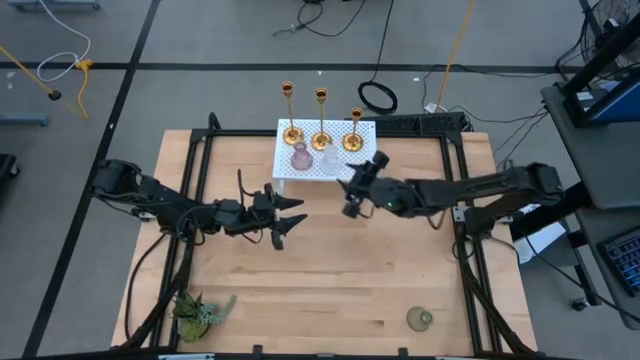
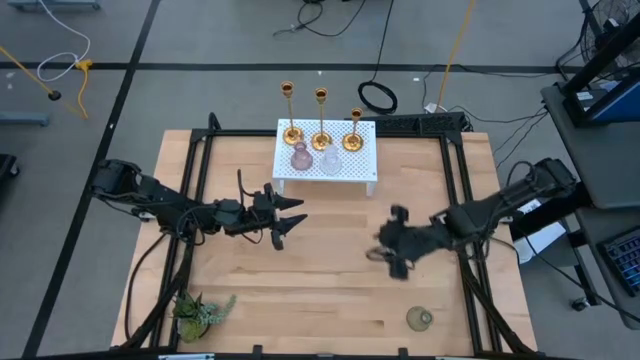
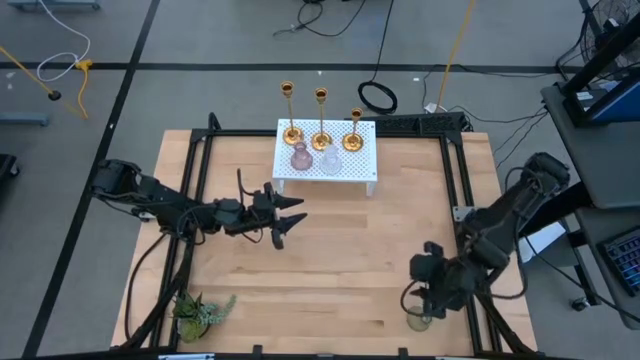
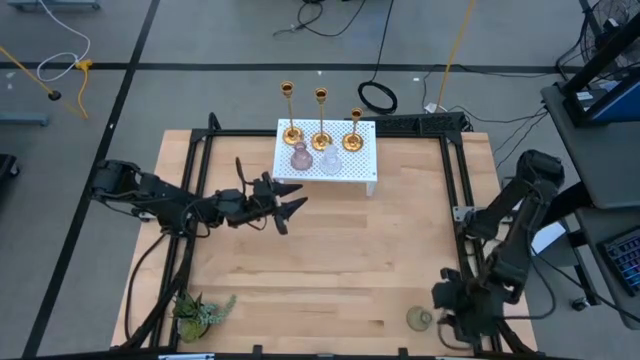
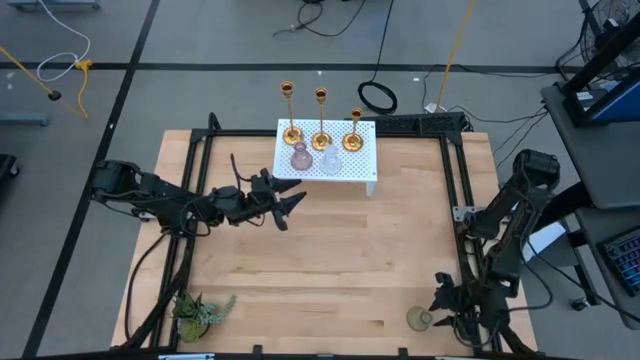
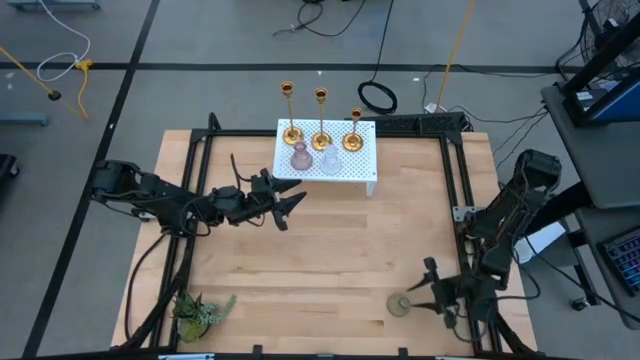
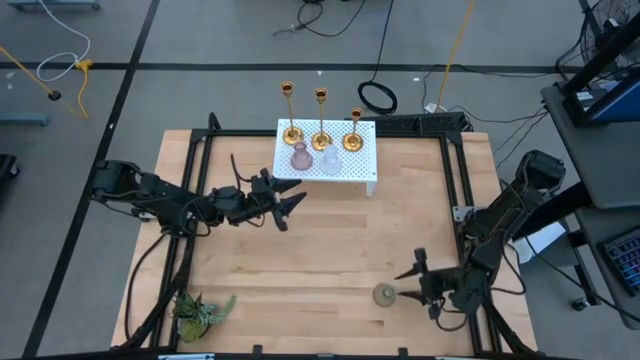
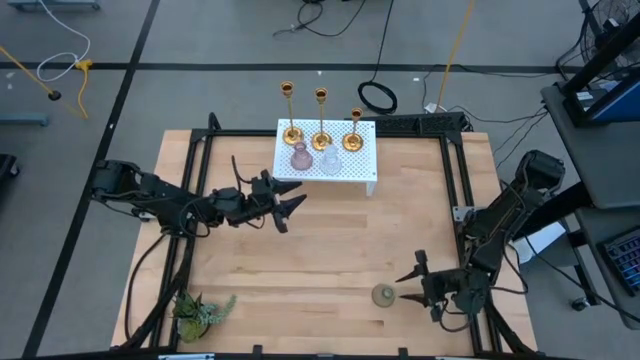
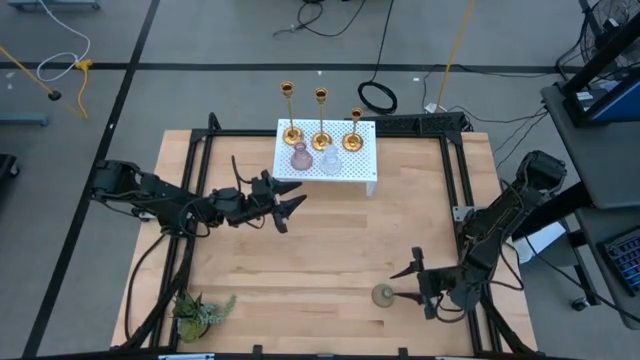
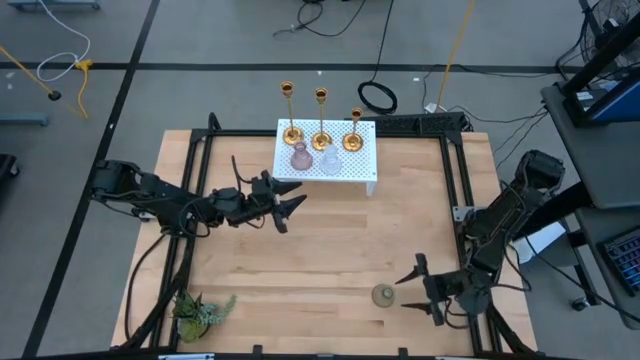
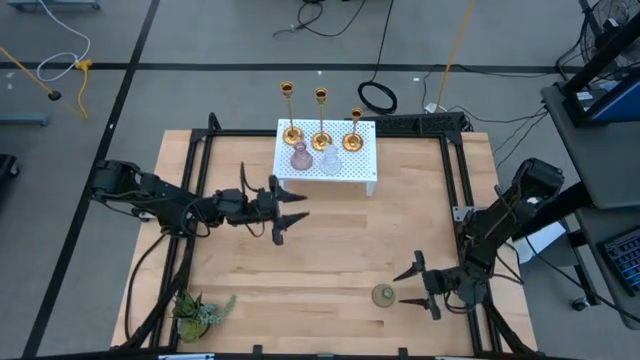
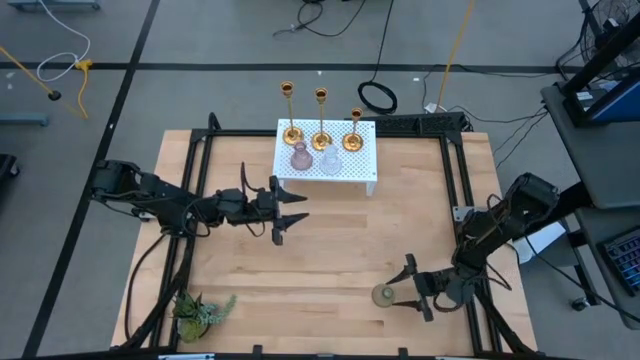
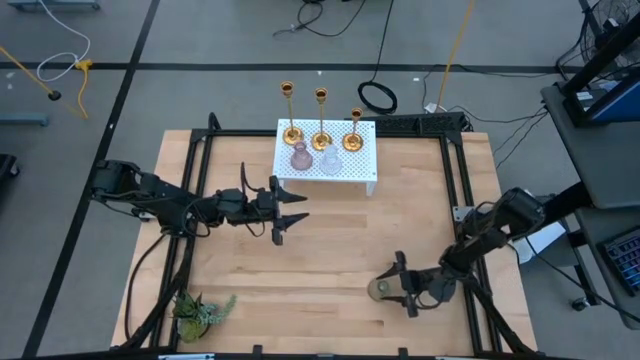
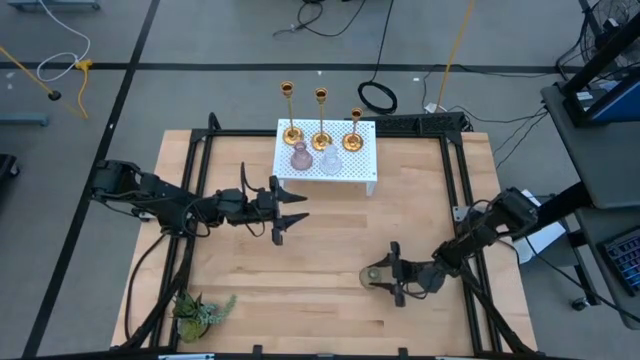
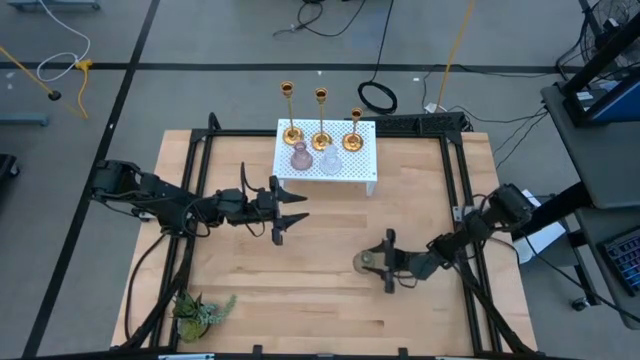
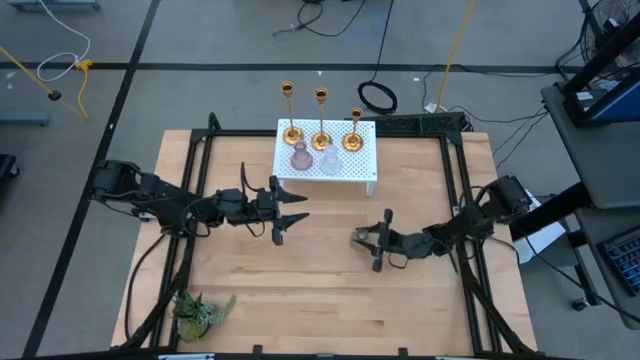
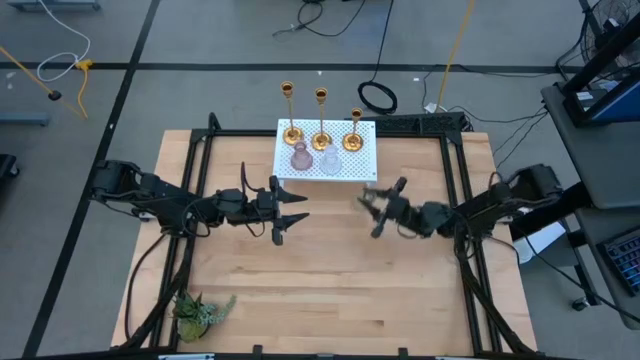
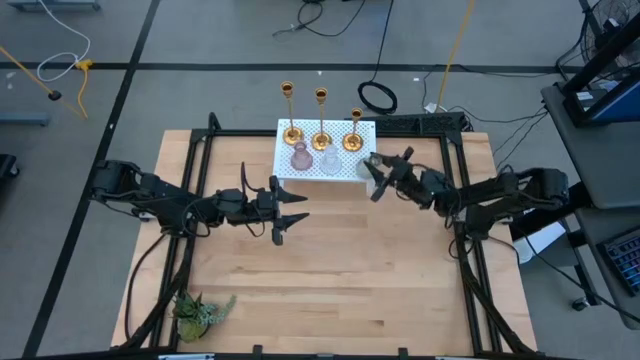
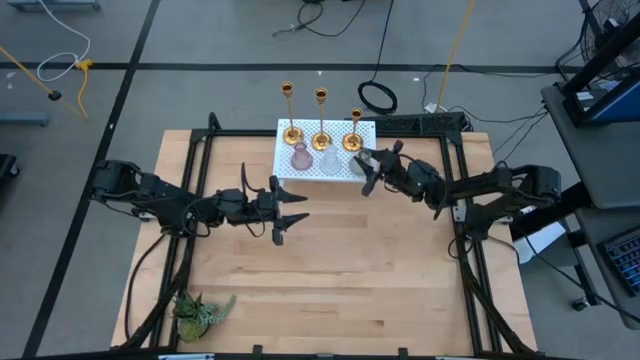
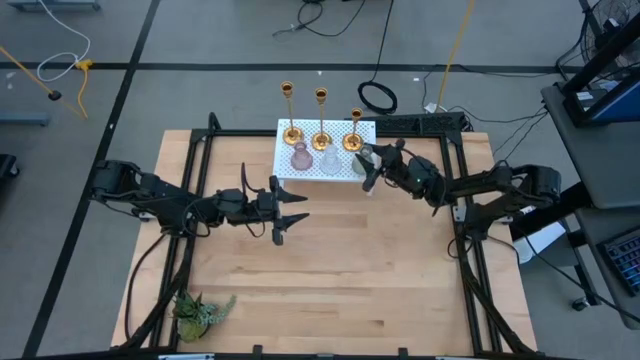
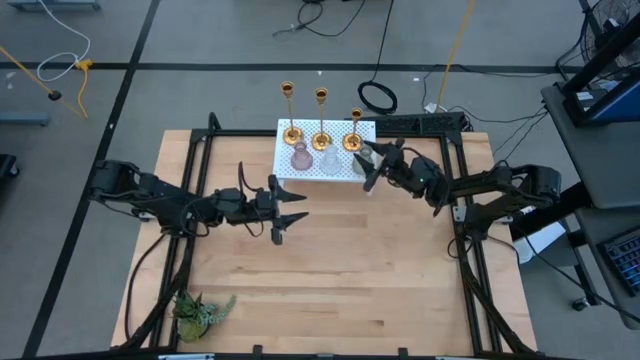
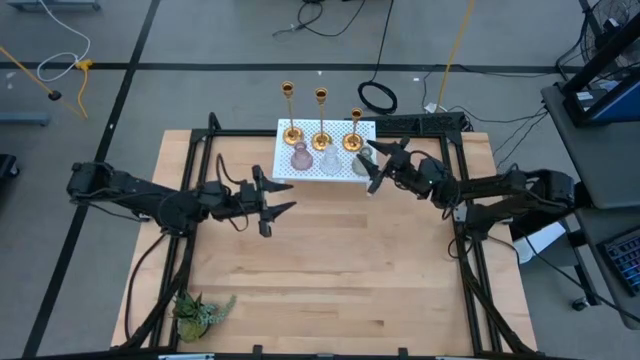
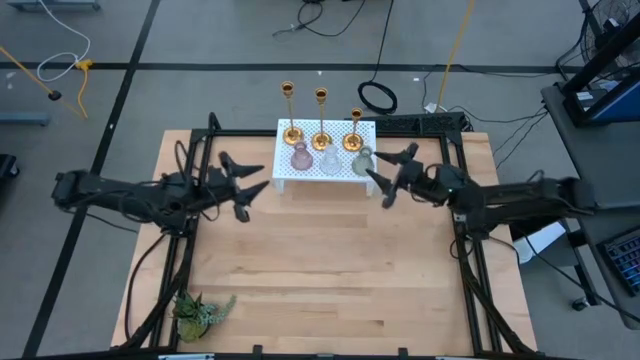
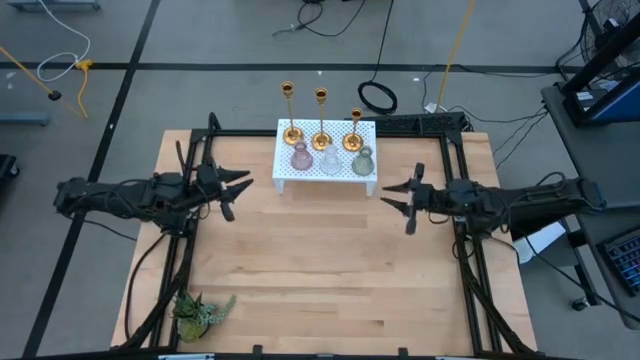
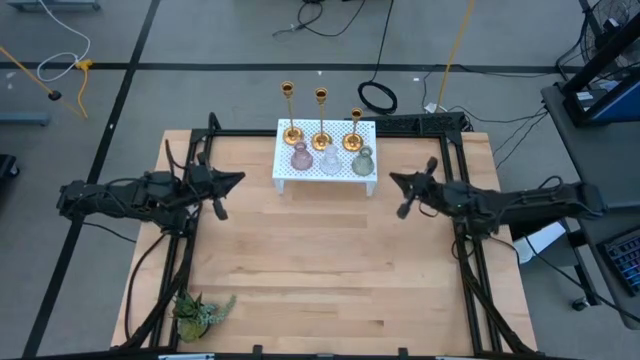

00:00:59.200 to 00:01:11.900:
Task: Pick & Place candle stick holders
Return to Home Position

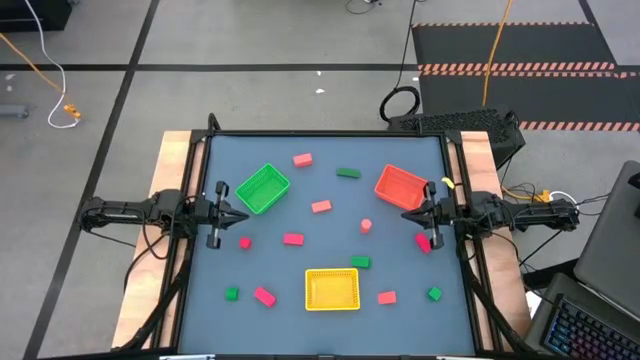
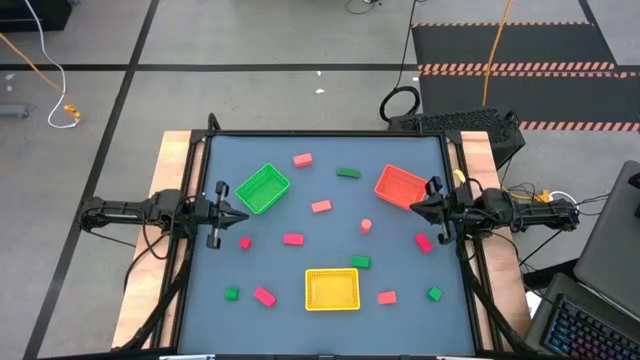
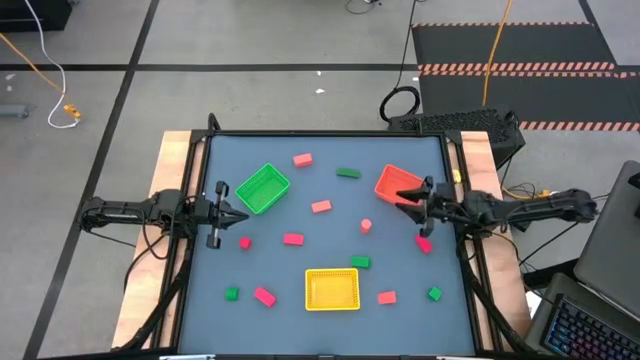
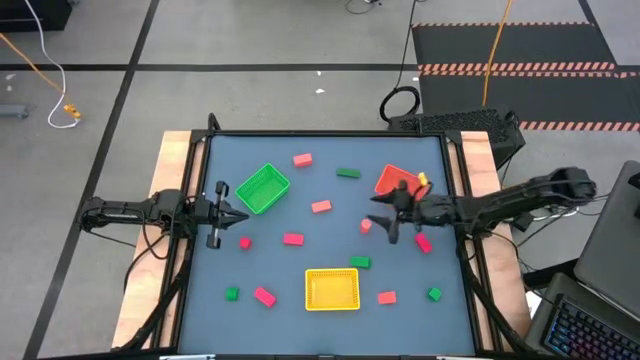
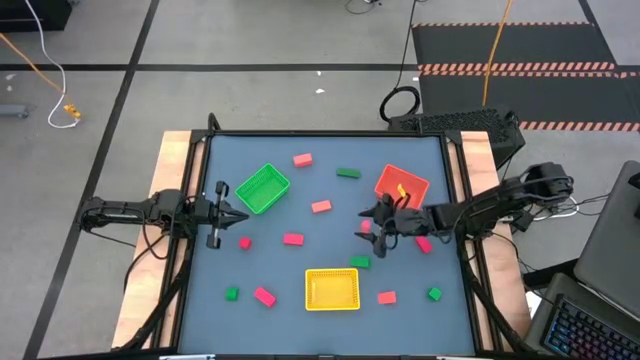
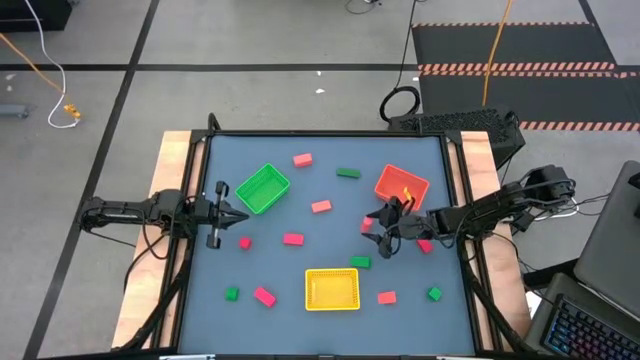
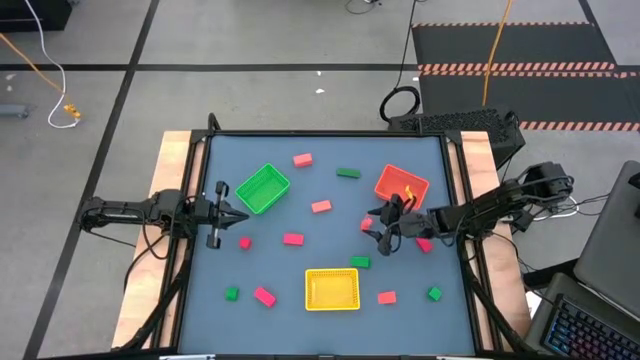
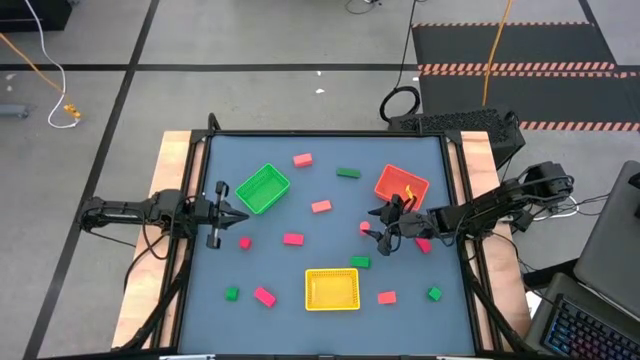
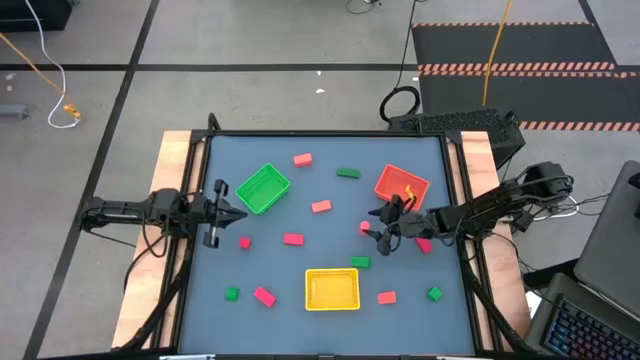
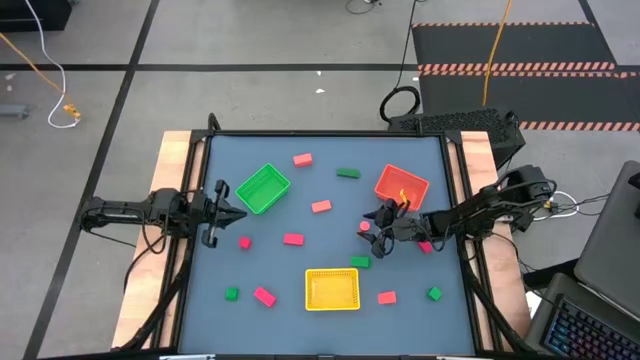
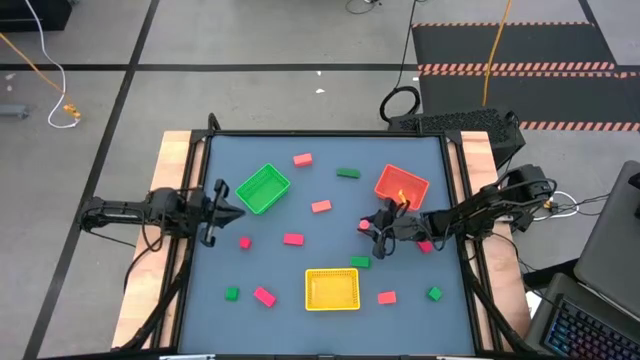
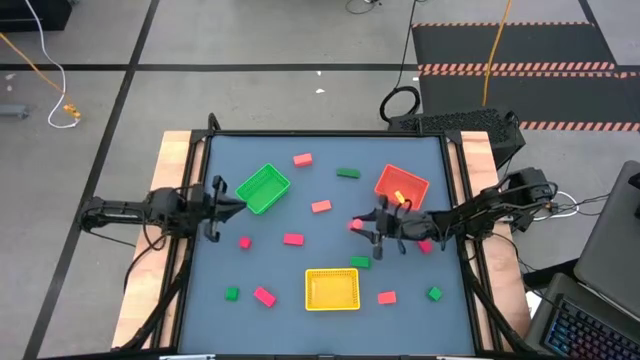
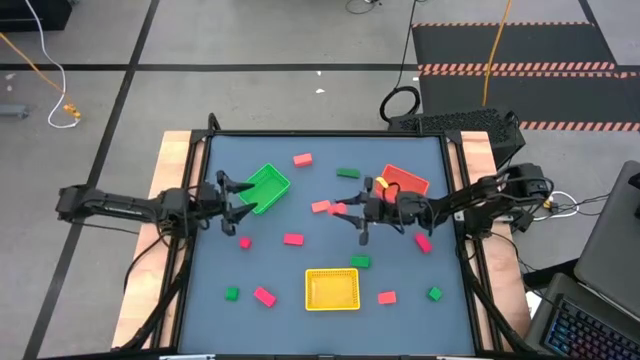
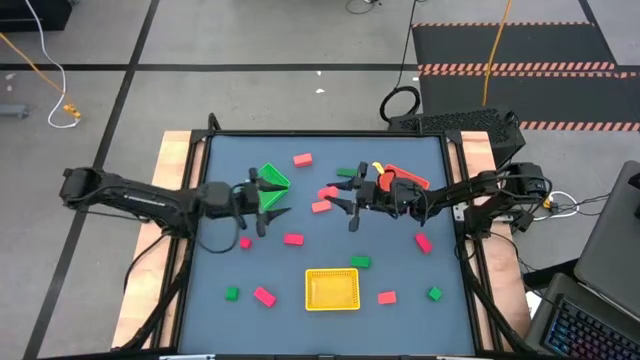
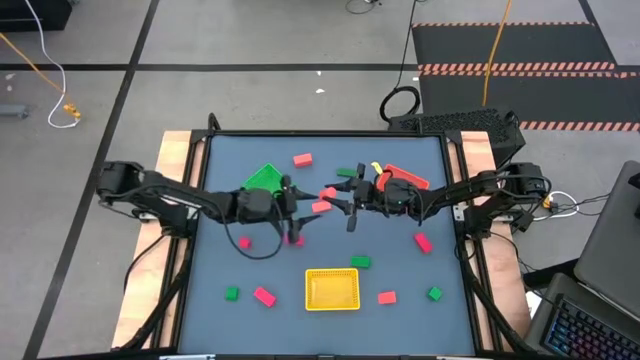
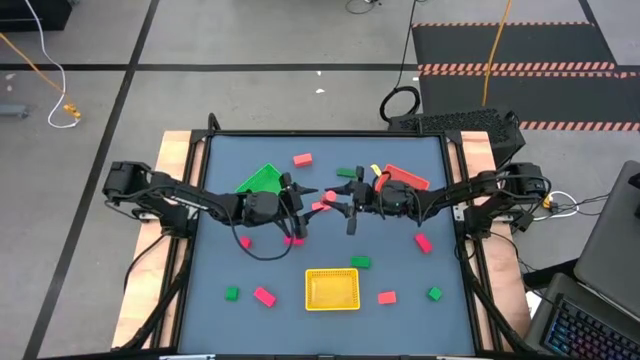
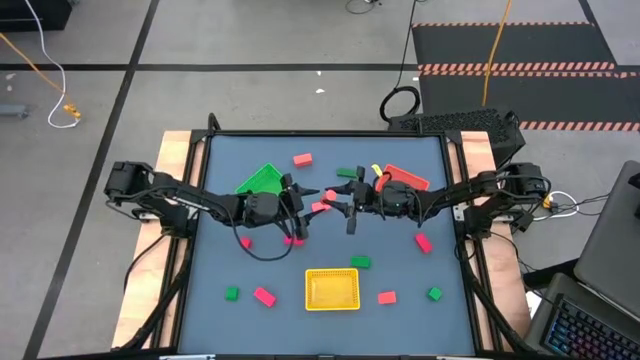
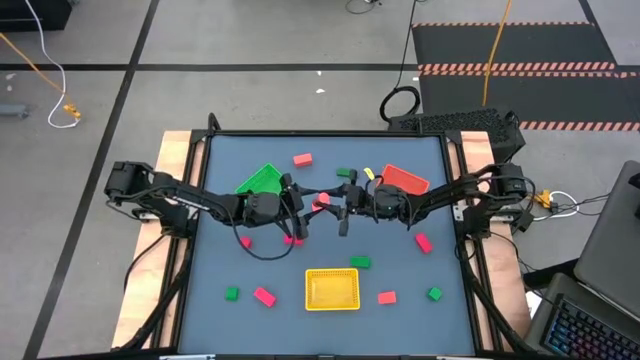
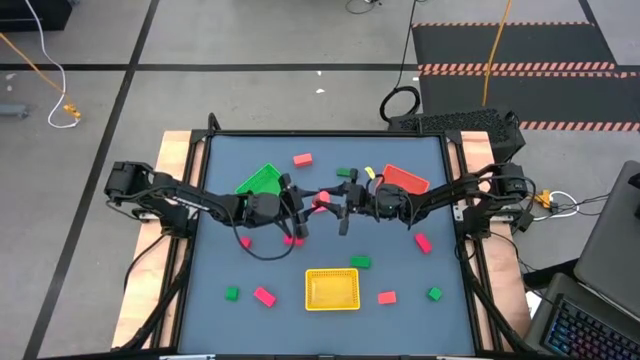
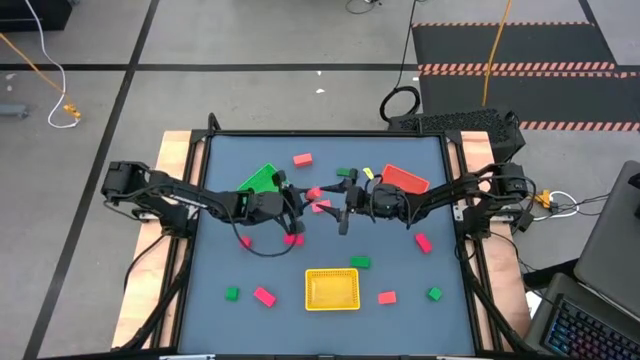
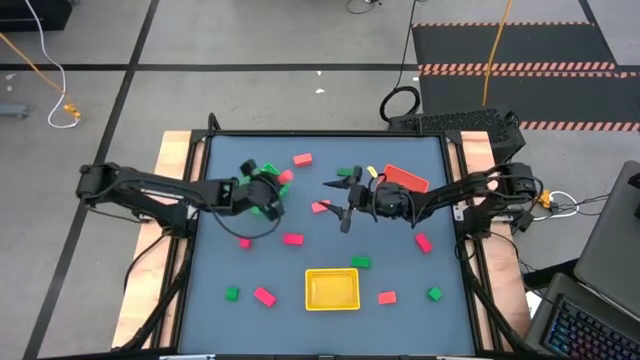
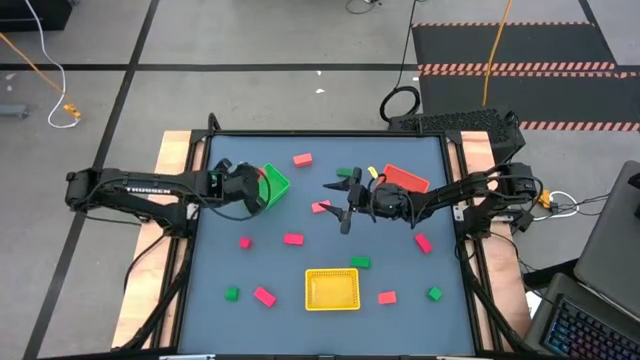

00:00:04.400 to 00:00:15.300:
Task: Sort & place blocks by color
Put the orange block into the green bin
